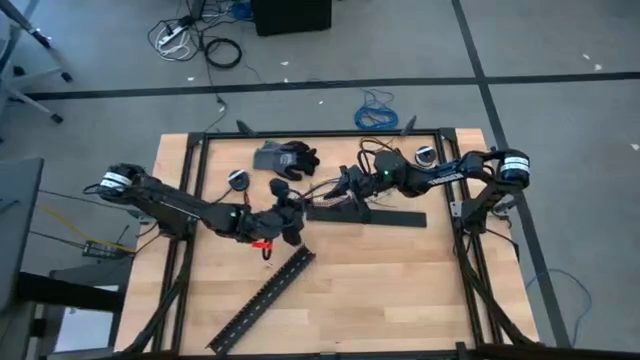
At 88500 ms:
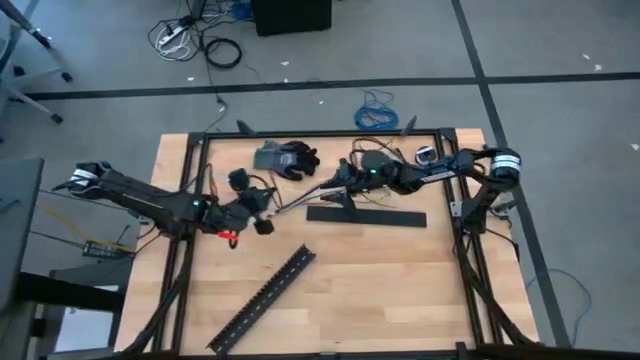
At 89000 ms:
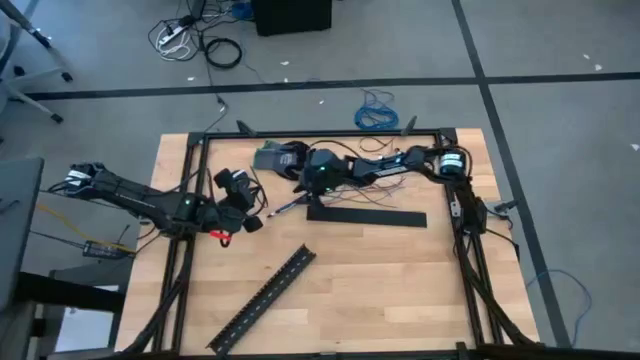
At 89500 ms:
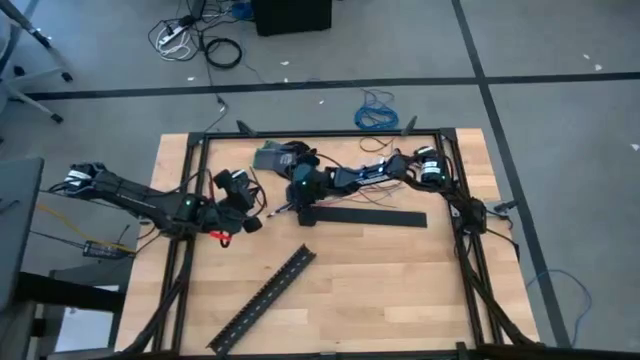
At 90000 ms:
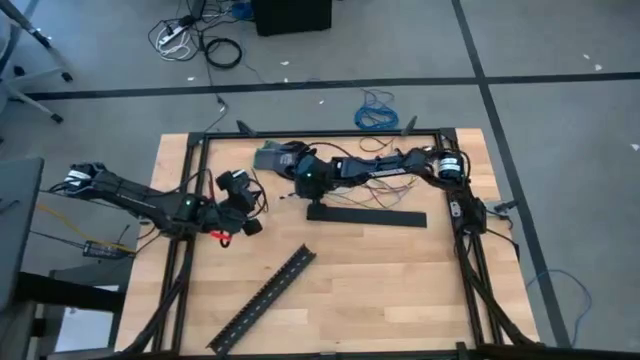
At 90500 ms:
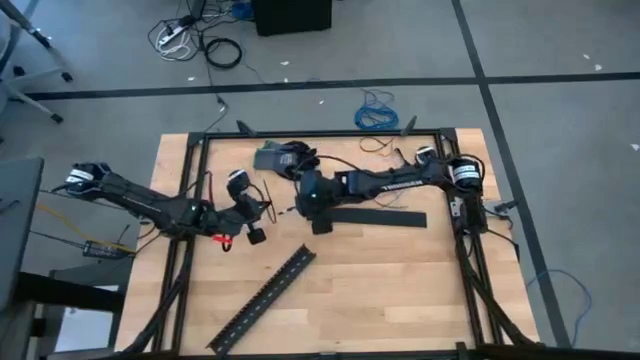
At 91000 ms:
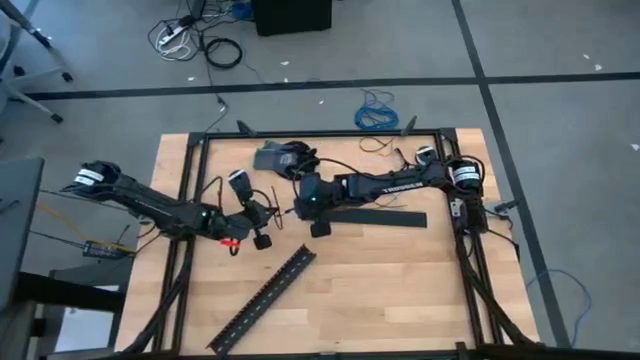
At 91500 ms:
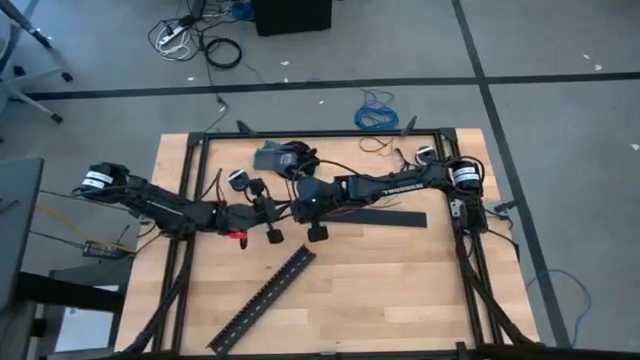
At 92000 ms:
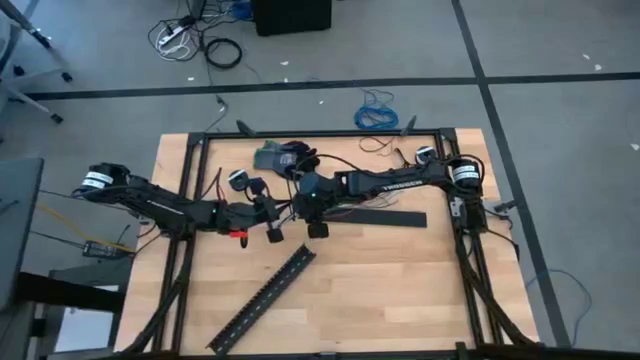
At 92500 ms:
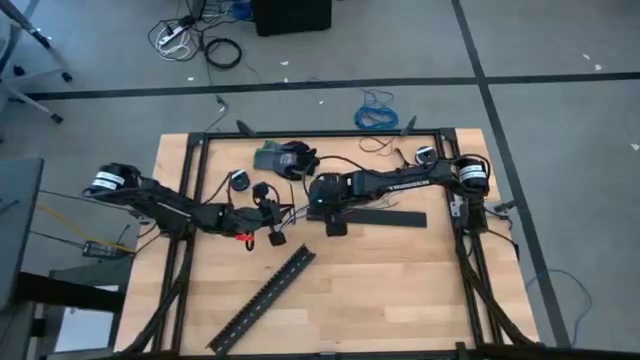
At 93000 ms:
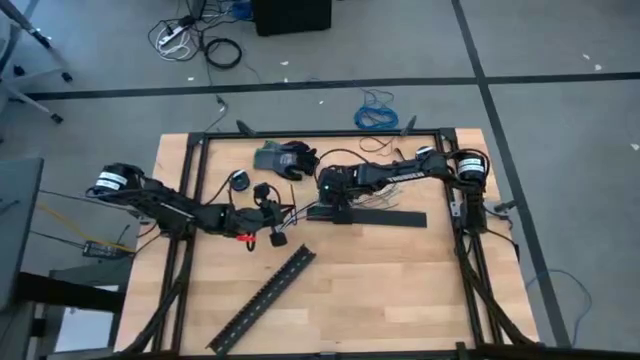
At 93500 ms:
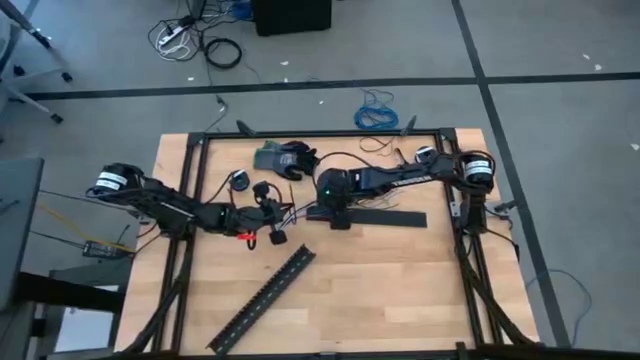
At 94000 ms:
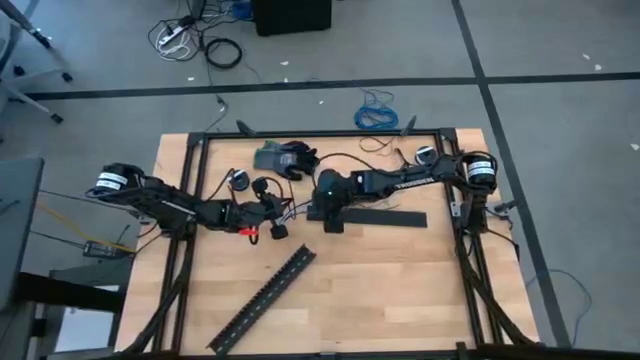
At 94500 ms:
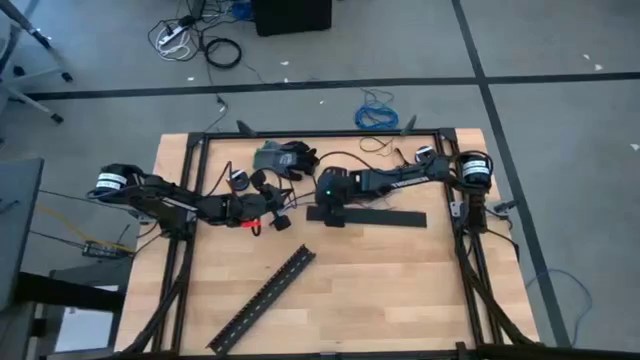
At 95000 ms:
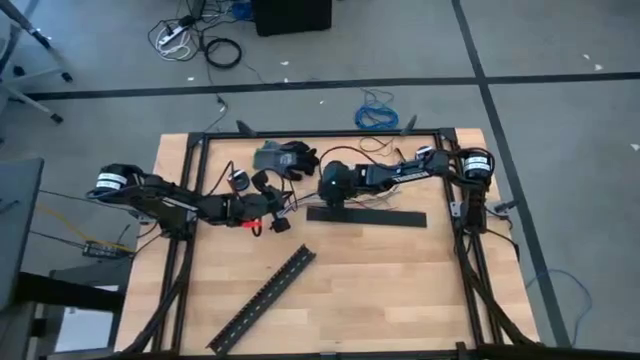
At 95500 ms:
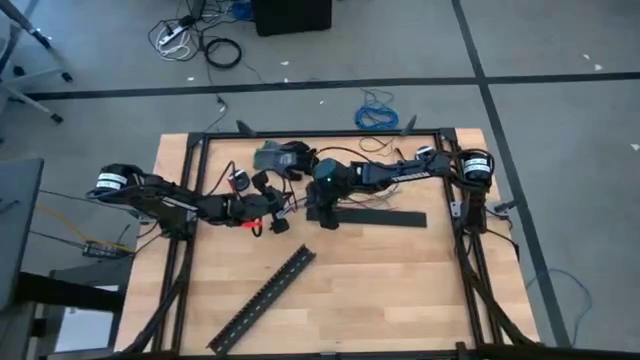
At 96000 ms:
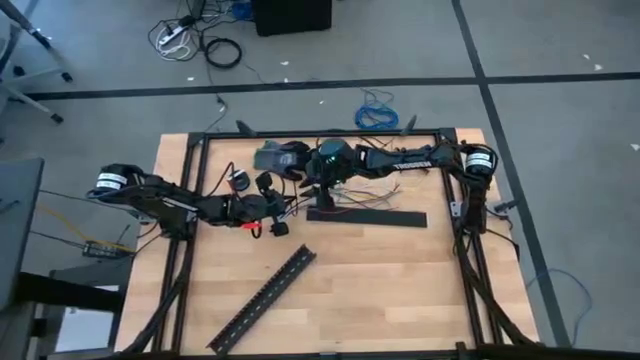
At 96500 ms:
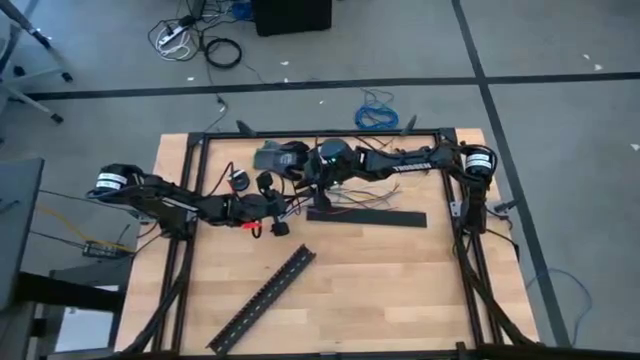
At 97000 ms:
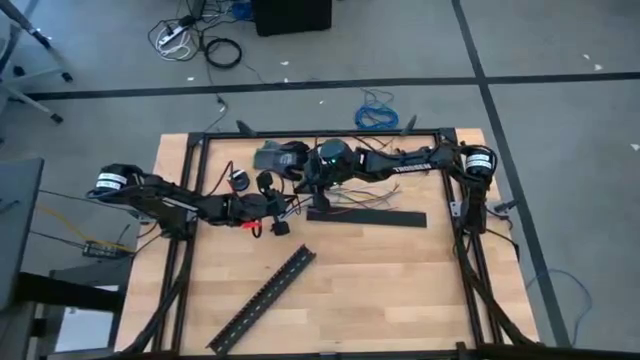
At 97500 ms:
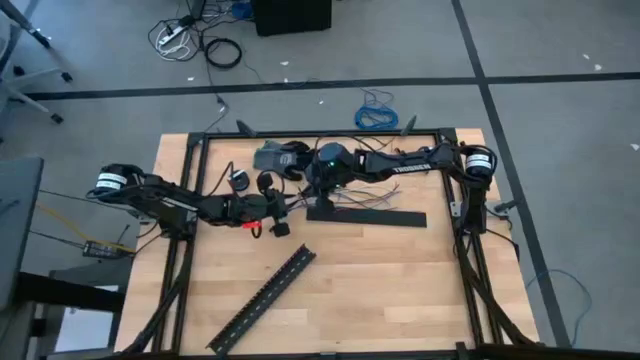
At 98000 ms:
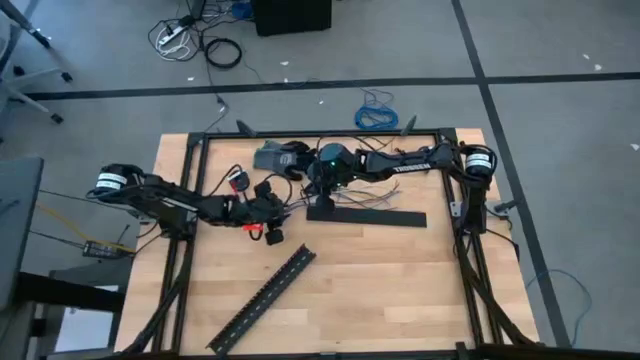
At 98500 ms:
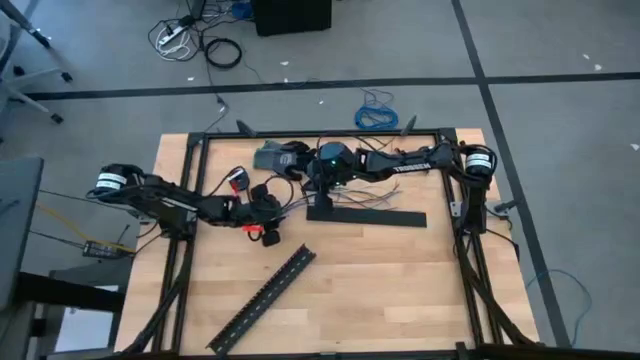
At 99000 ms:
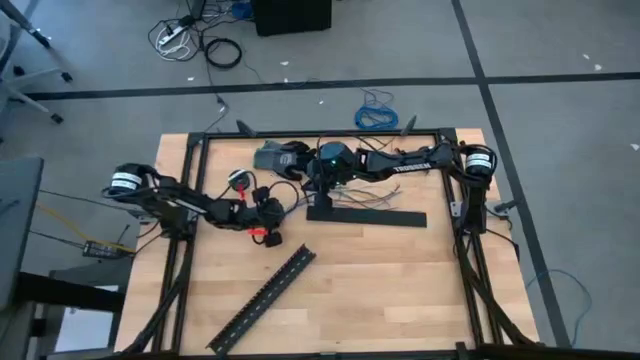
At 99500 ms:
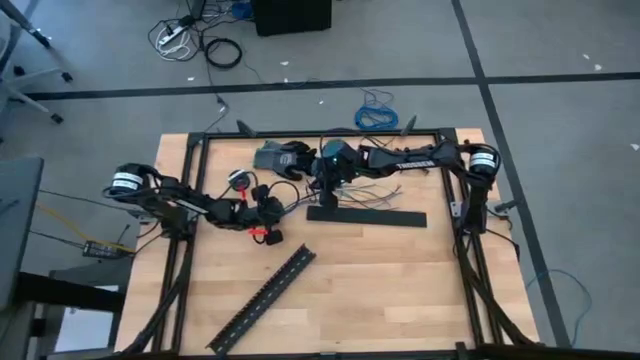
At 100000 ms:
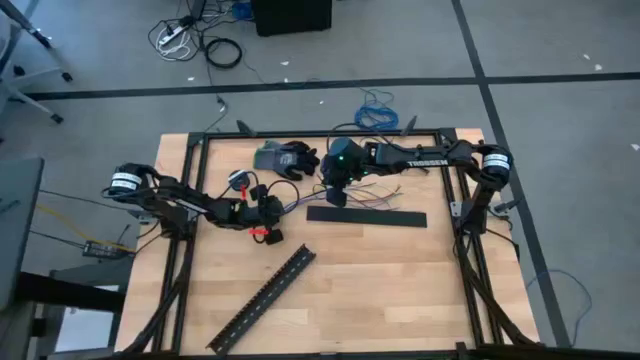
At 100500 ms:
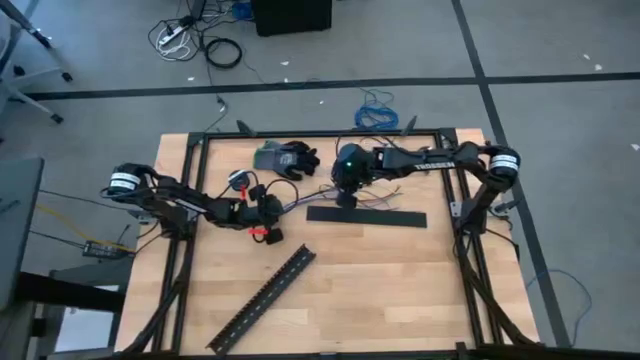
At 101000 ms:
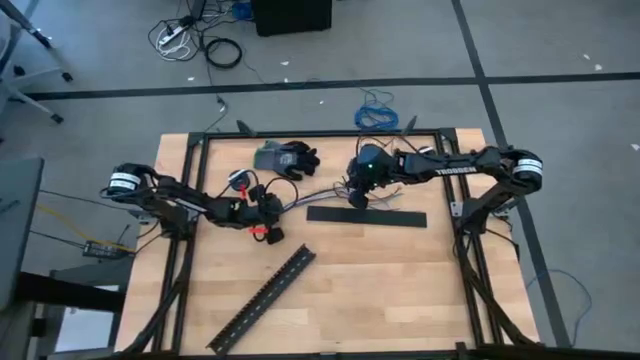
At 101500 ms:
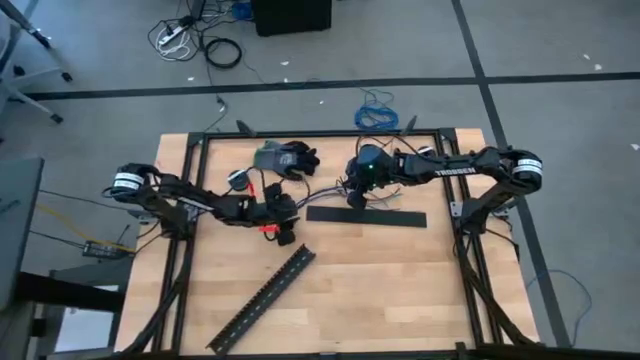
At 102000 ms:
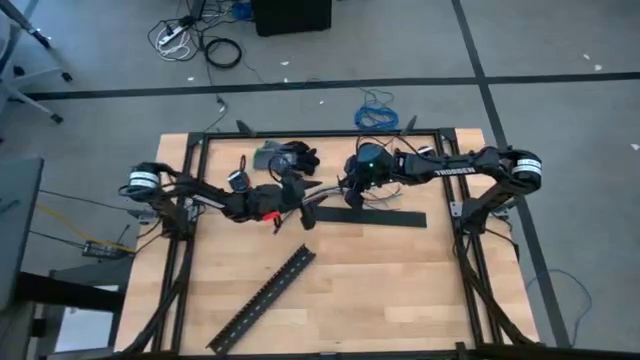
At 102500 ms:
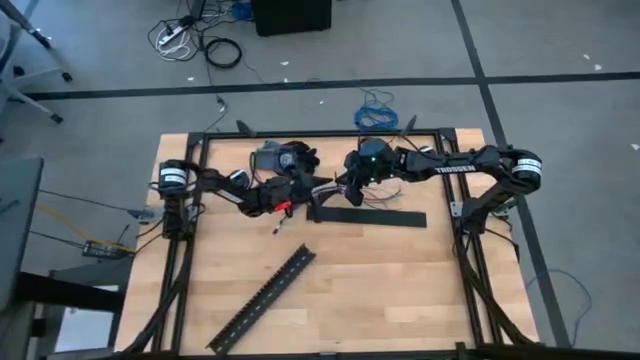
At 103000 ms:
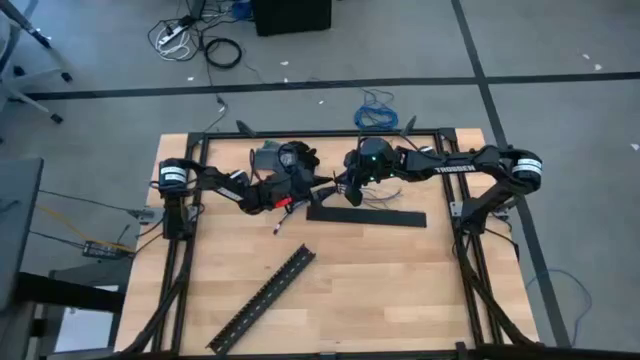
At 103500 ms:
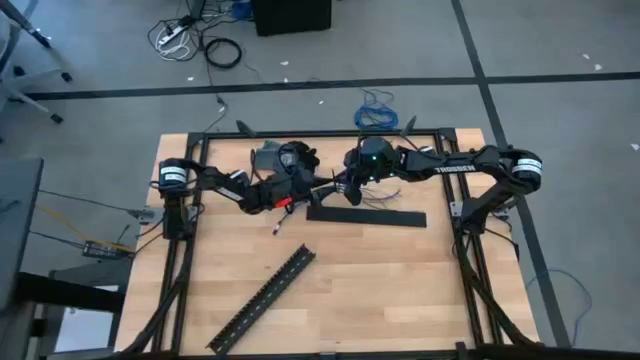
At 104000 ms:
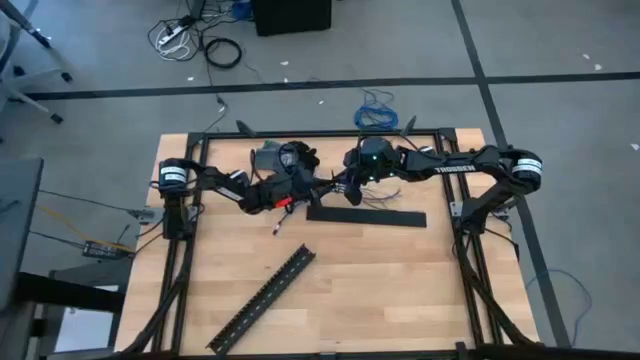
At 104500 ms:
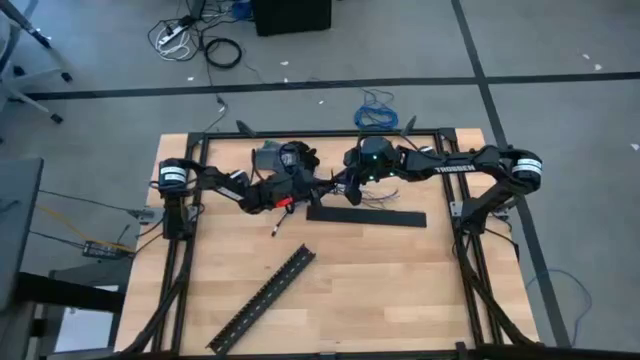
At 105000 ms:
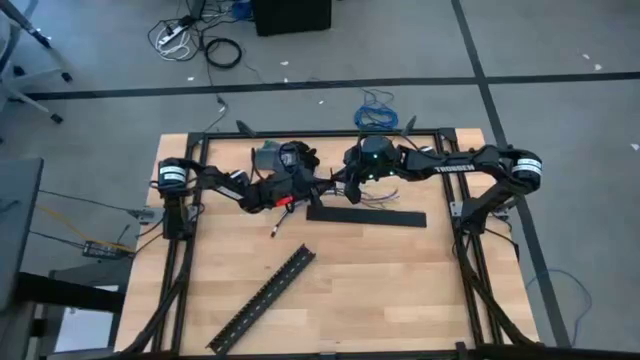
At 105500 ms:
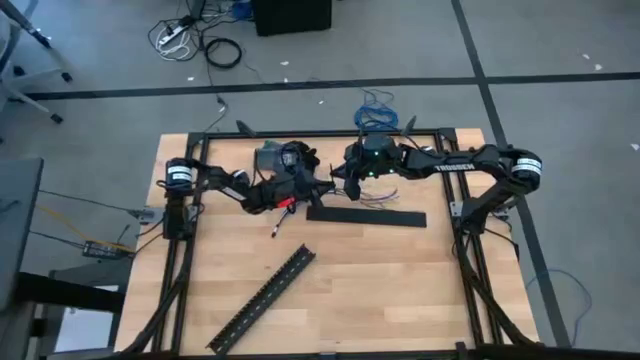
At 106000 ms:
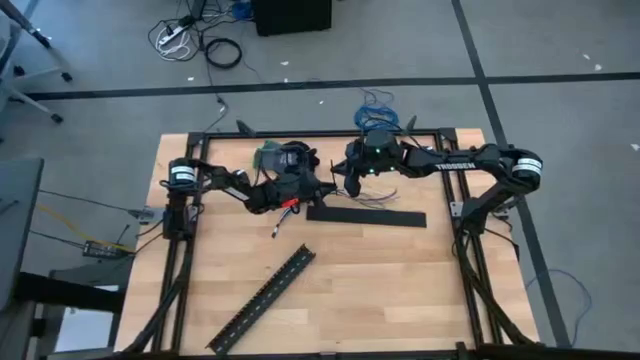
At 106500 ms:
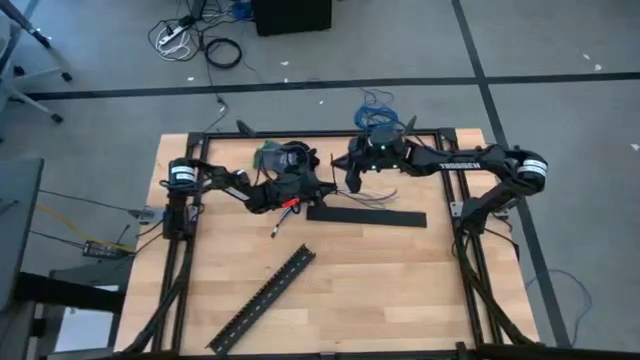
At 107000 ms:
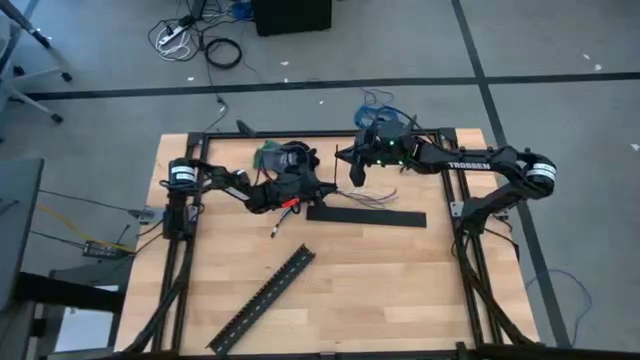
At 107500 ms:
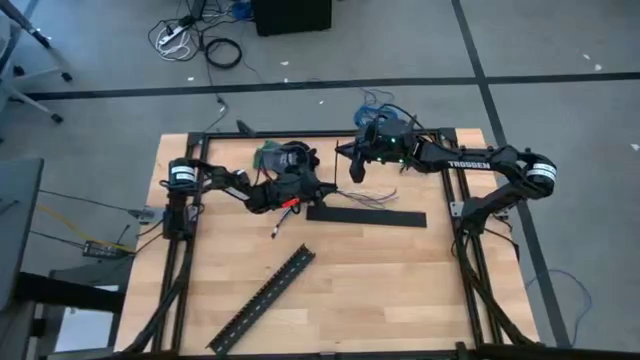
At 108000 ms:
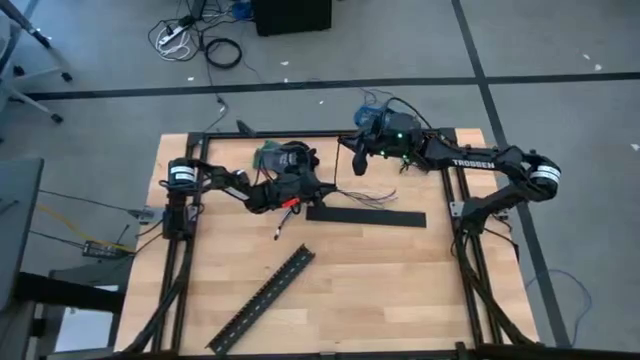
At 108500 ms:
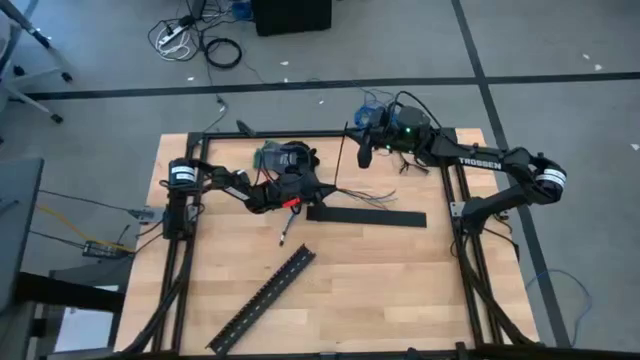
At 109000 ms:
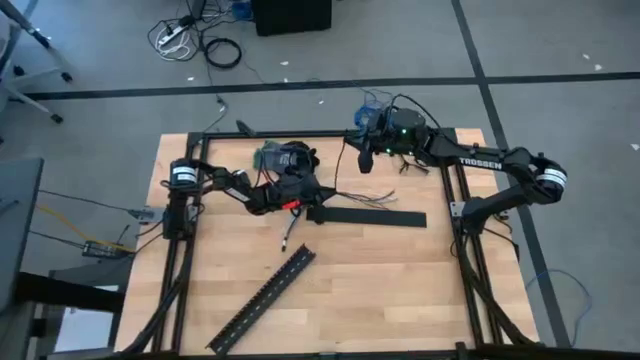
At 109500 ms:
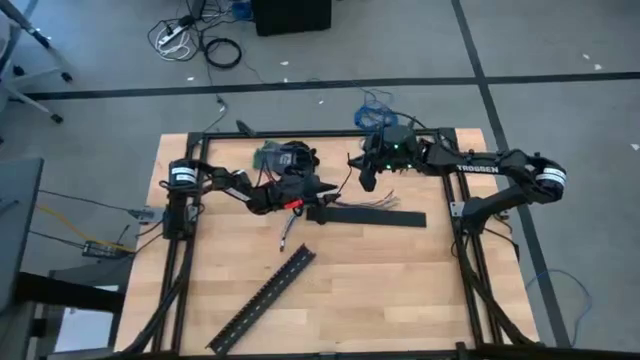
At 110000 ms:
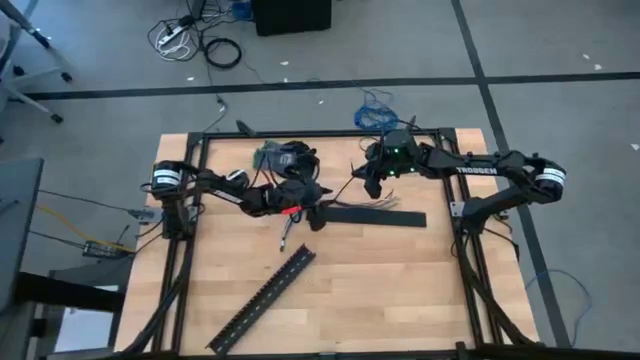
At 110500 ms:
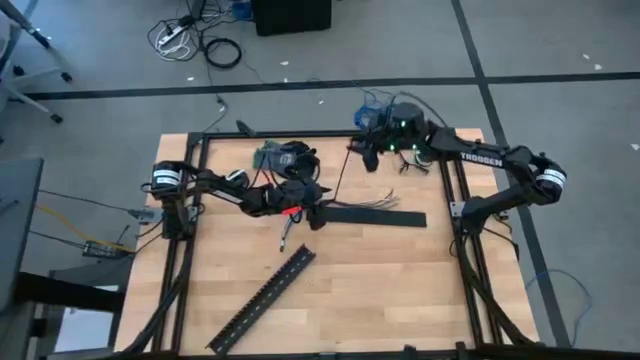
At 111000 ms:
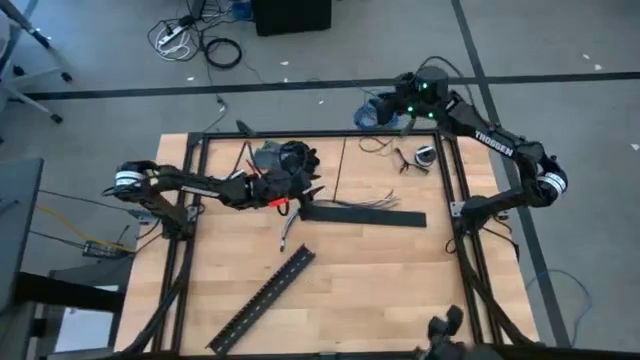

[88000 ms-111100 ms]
Task: Ziptie cables
Wrap the cable wires with the black zip tie
